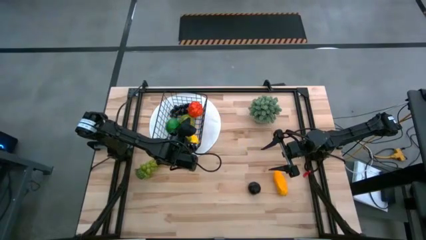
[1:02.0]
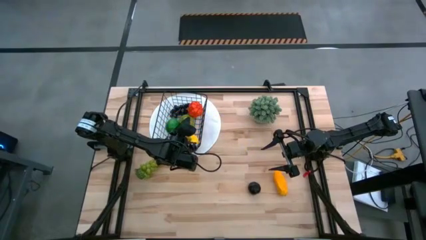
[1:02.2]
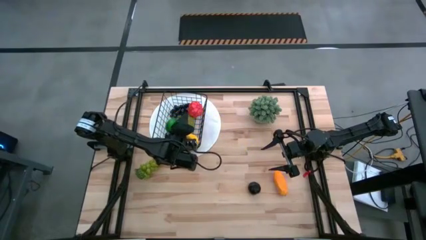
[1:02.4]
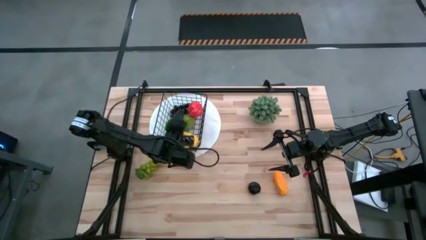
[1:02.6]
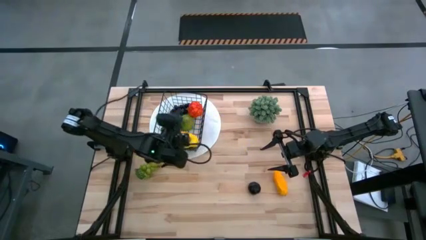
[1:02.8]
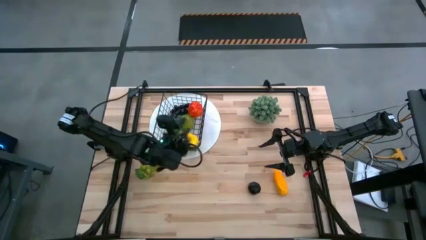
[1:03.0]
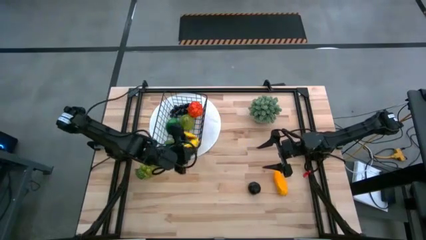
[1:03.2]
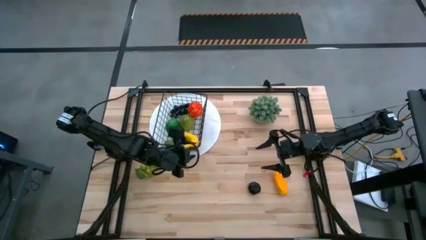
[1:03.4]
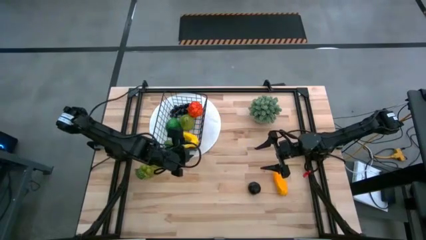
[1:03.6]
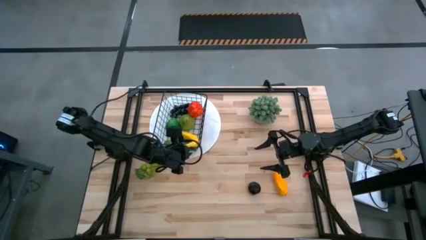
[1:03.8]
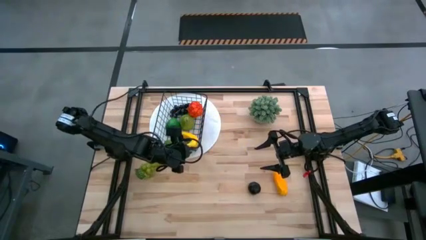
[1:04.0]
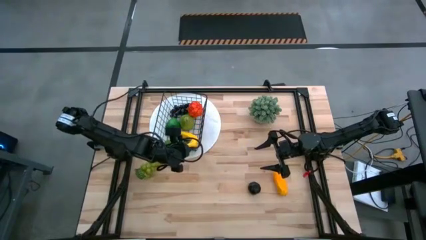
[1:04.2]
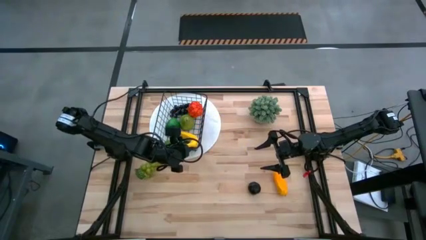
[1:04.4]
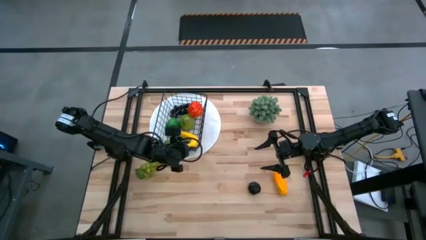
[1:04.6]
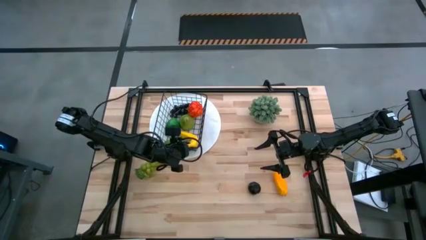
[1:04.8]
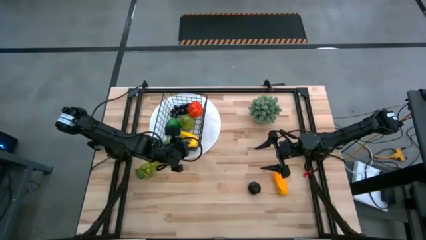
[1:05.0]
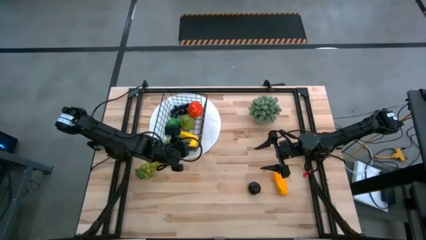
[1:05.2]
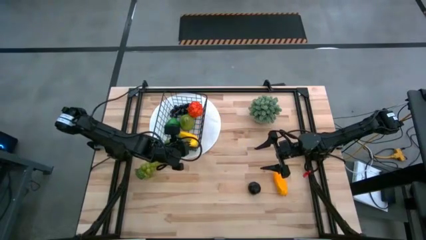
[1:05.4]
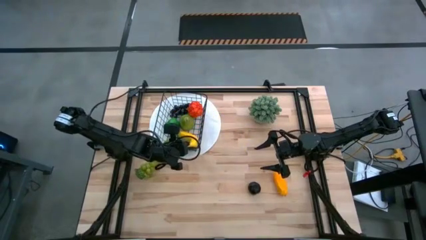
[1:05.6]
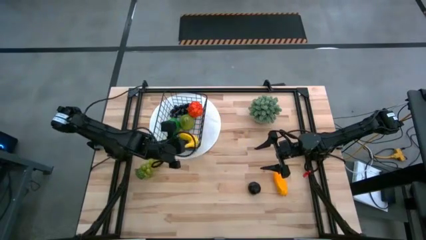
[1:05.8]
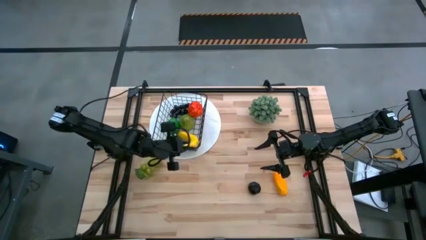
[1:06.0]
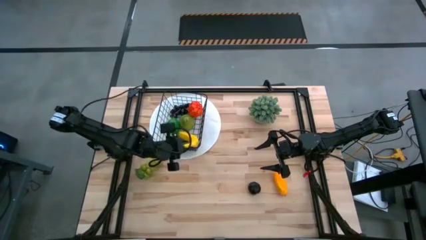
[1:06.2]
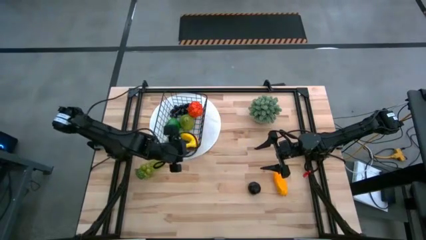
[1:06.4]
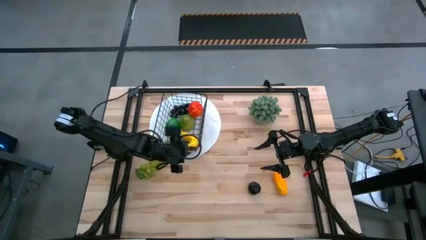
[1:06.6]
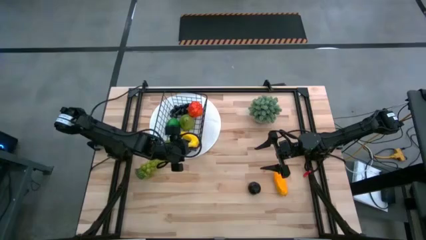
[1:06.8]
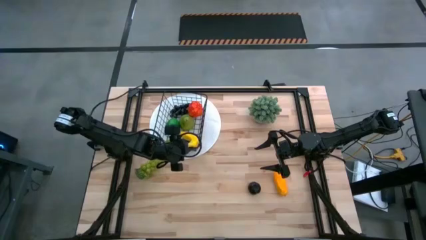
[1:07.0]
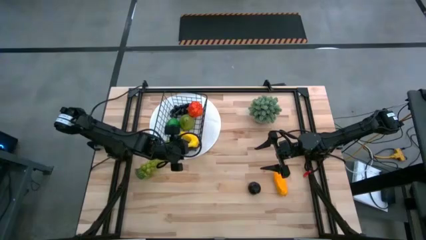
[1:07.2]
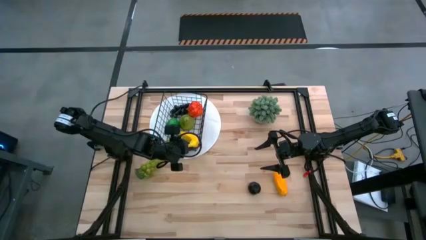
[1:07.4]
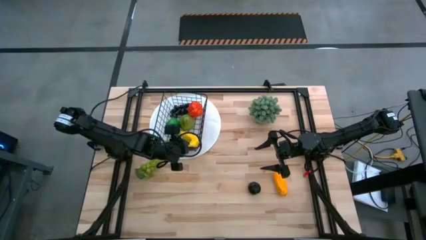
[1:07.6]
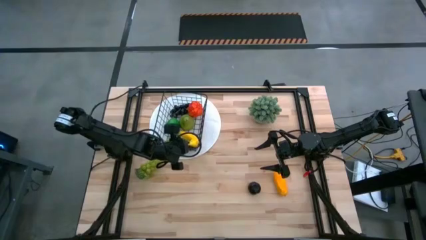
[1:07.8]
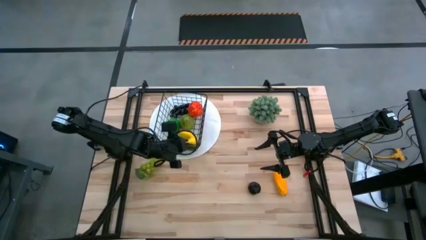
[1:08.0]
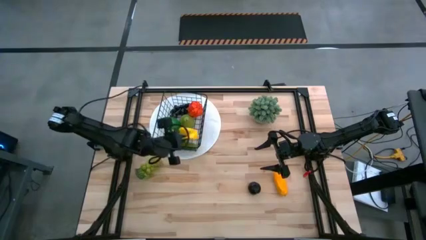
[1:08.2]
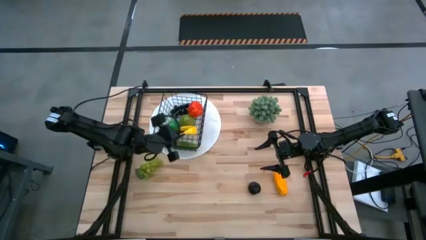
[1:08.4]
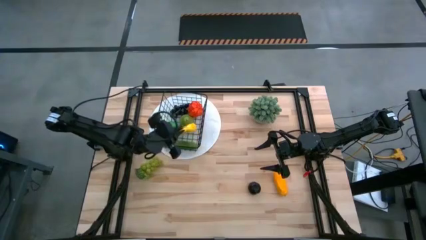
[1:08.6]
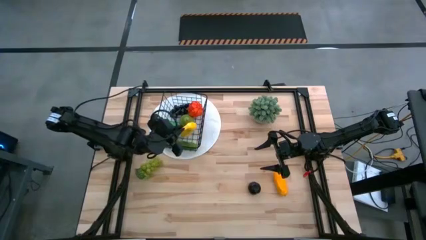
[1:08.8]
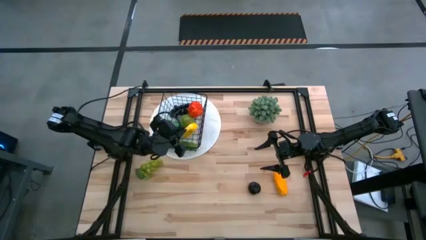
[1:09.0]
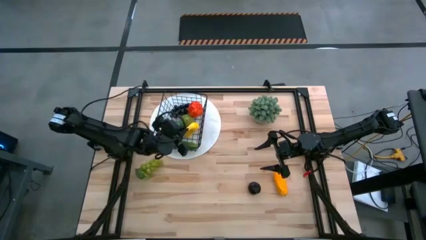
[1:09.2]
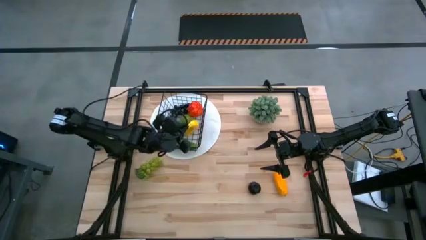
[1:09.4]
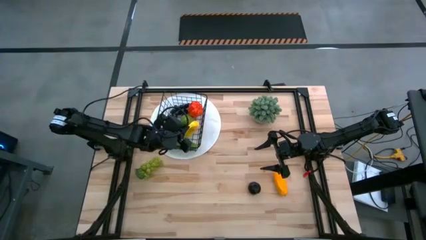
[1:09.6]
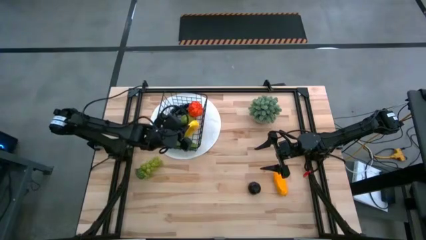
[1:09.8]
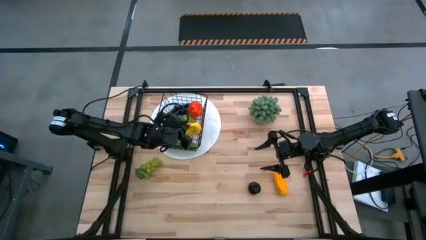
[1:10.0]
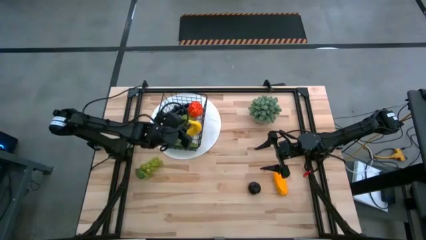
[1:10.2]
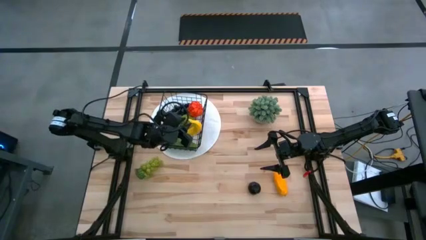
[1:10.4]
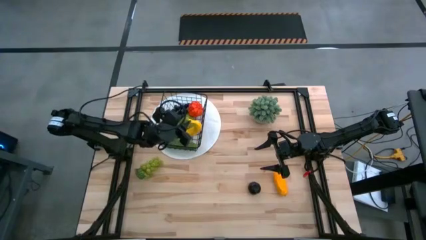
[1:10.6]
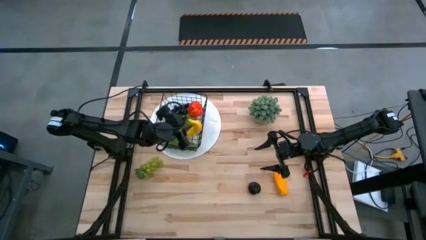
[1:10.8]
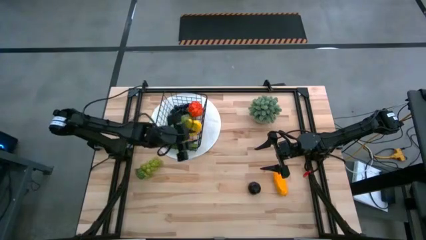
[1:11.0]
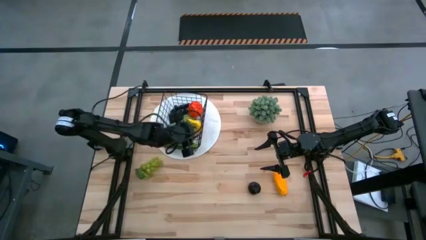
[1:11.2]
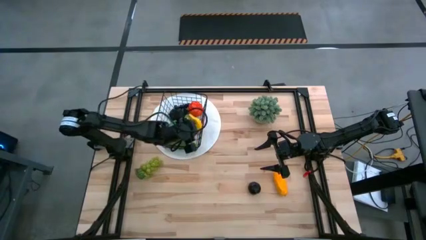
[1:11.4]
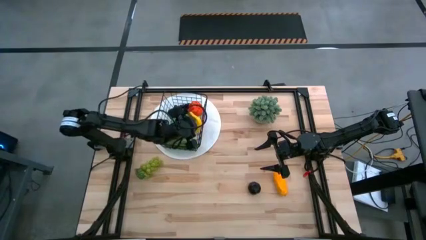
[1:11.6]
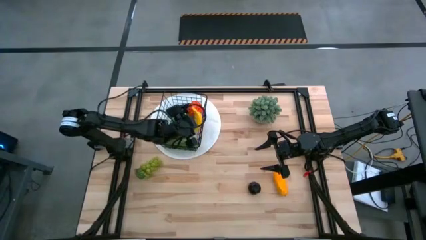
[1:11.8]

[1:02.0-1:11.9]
Task: Build produce basket
Put the yellow banana into the wire basket

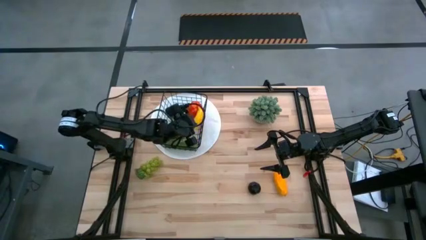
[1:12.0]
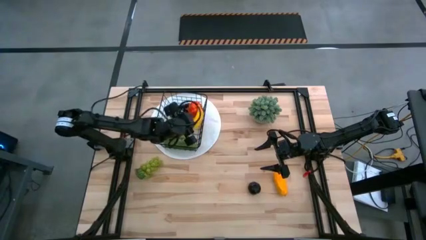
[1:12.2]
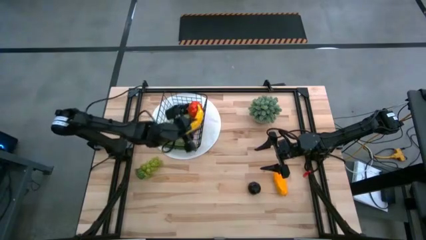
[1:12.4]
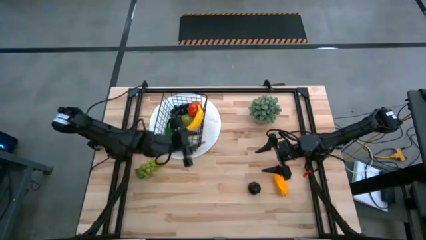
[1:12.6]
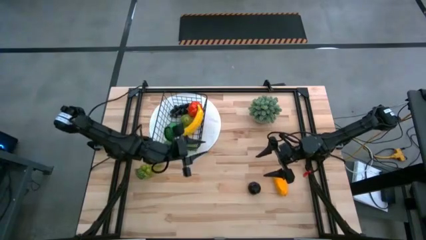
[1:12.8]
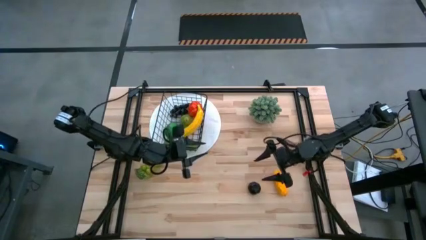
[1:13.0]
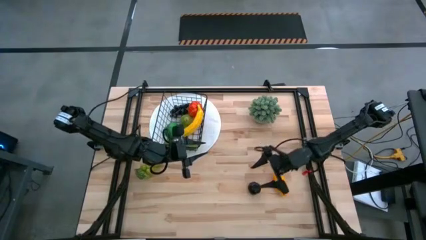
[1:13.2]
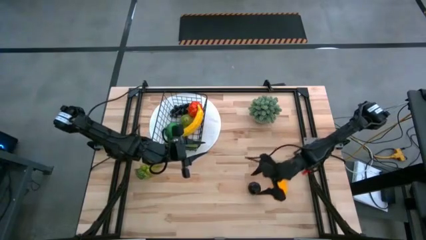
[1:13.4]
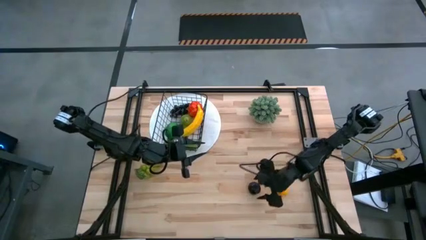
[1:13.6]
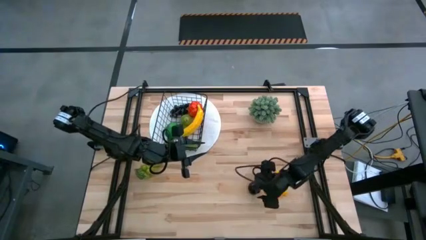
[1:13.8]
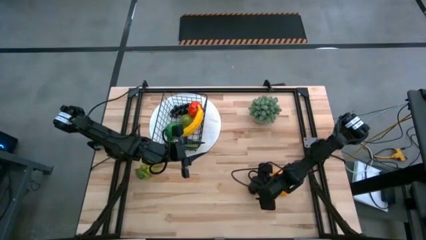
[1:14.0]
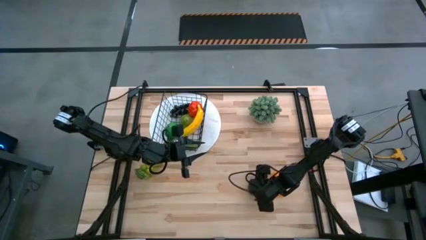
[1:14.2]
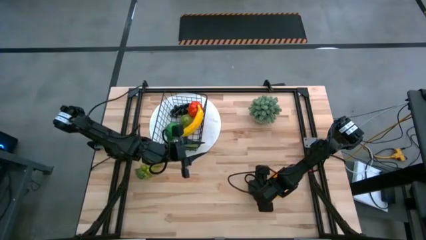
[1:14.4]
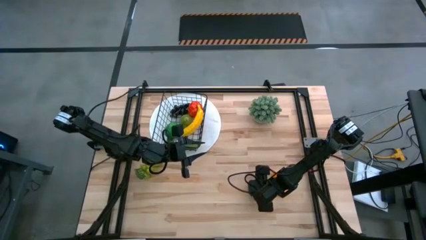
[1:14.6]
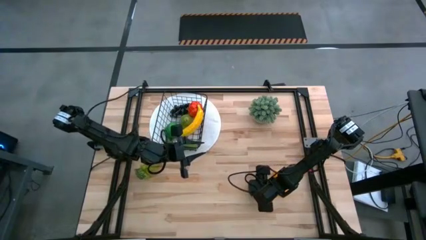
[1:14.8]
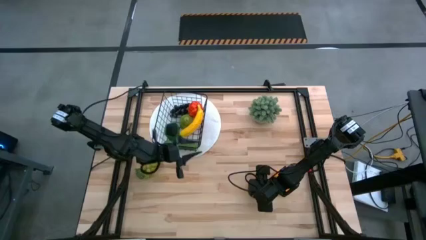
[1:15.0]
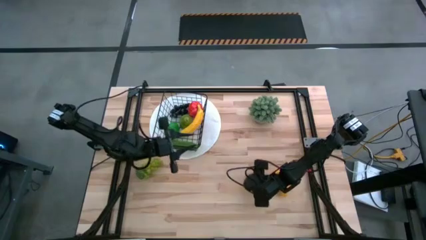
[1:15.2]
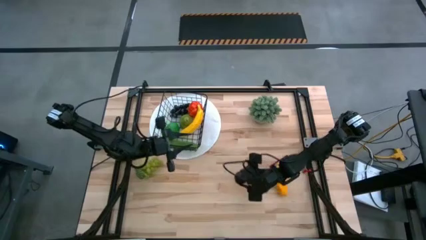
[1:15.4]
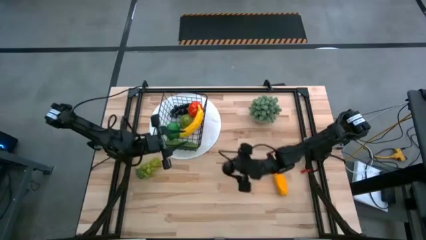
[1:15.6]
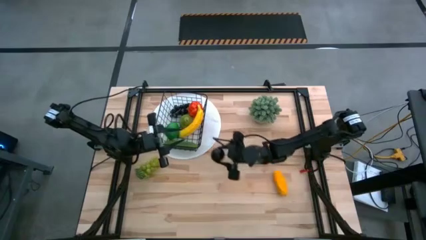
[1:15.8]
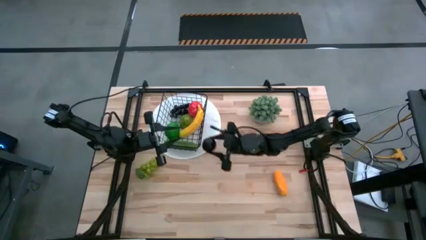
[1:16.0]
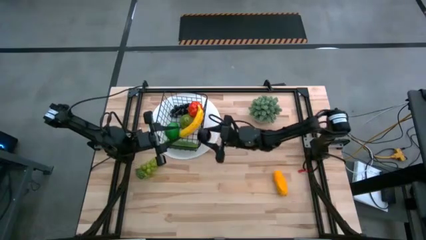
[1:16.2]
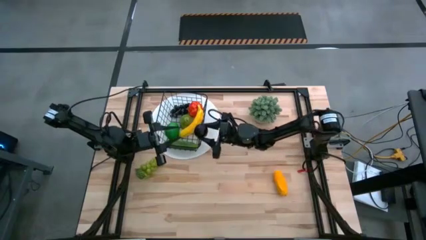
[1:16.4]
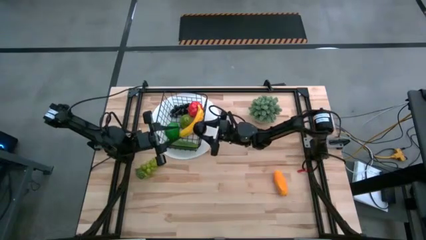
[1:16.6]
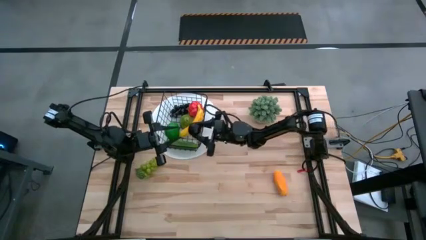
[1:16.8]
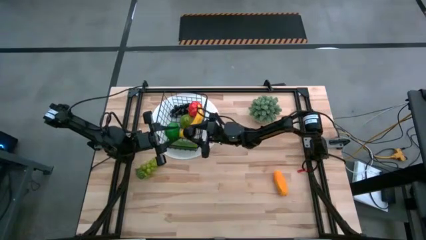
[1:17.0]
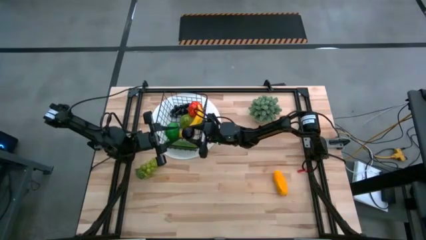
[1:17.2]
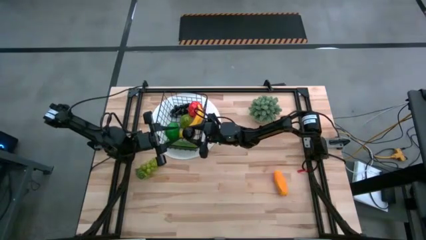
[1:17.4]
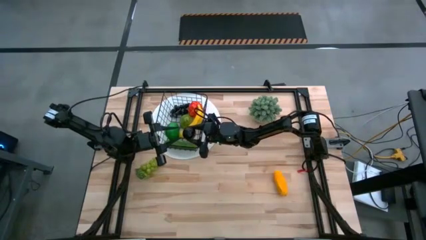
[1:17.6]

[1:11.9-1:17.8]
Put the black plum into the wire basket
